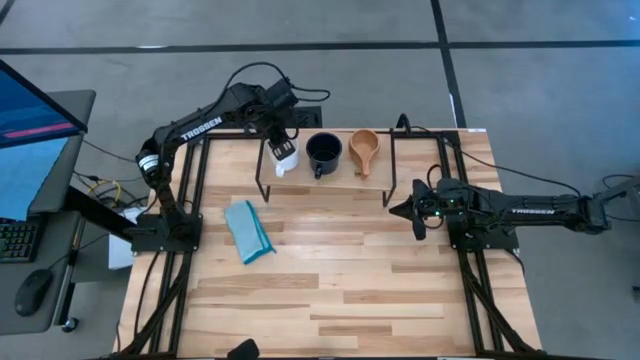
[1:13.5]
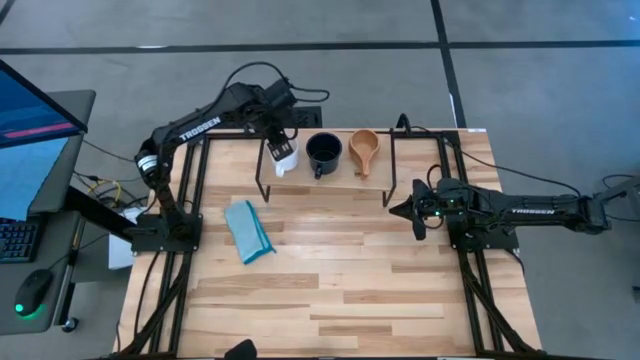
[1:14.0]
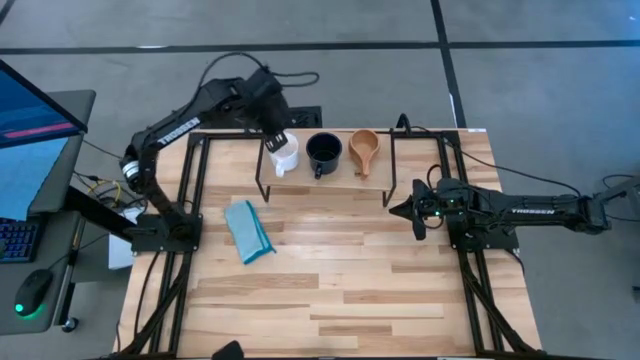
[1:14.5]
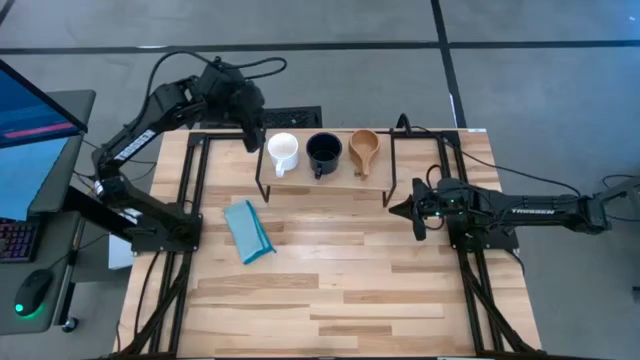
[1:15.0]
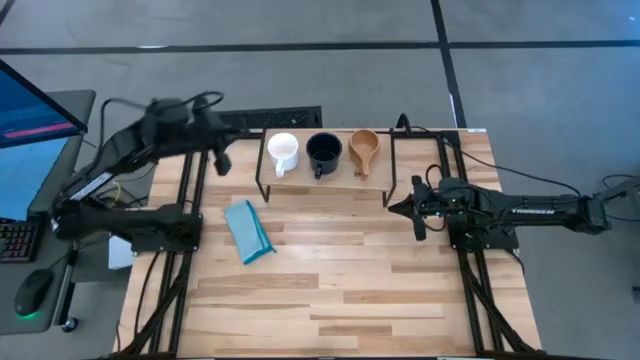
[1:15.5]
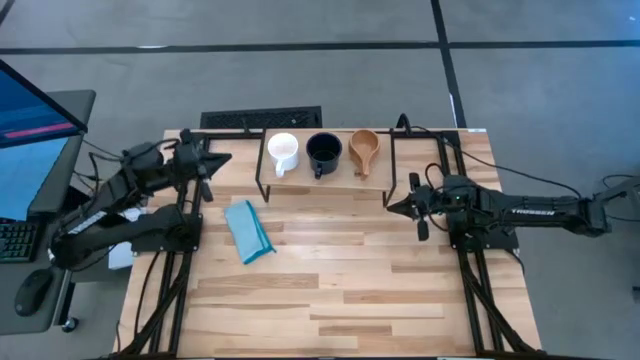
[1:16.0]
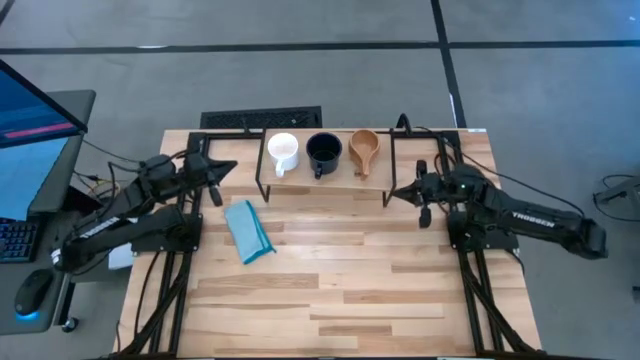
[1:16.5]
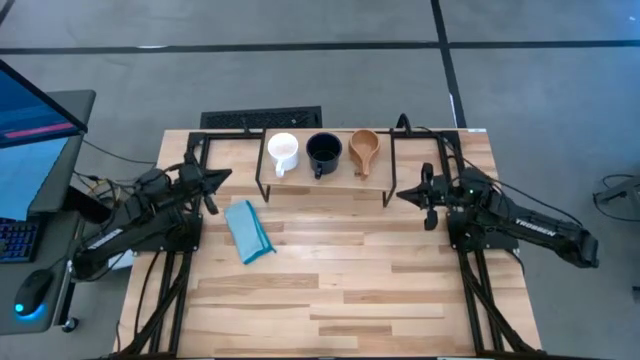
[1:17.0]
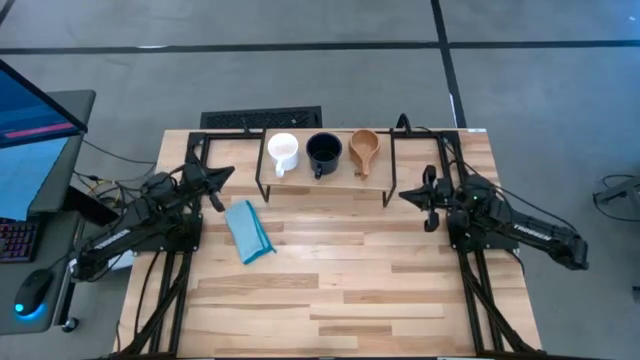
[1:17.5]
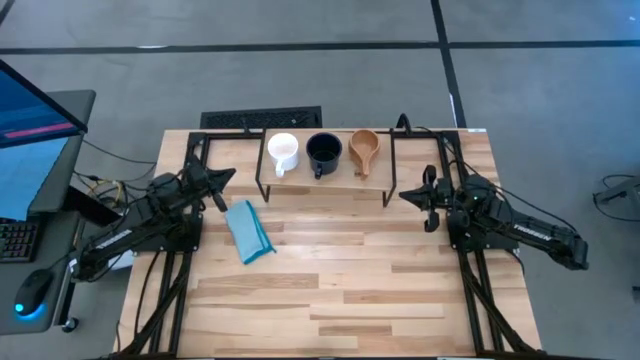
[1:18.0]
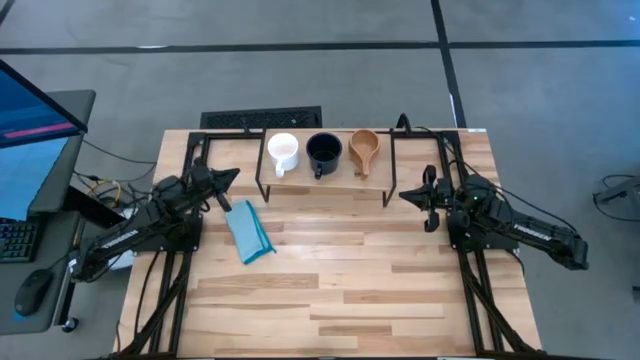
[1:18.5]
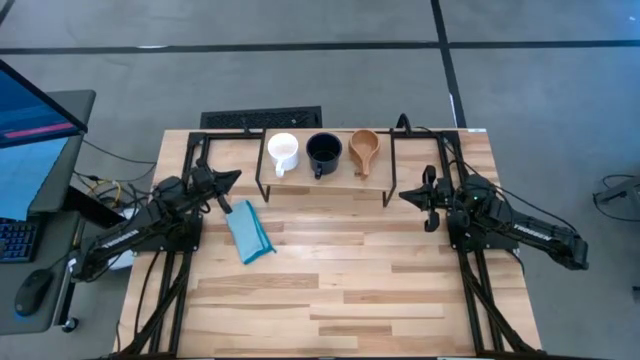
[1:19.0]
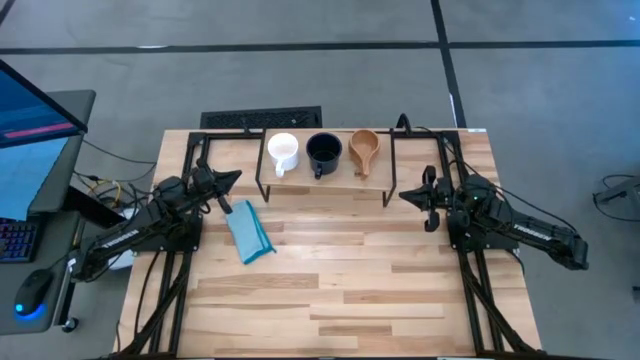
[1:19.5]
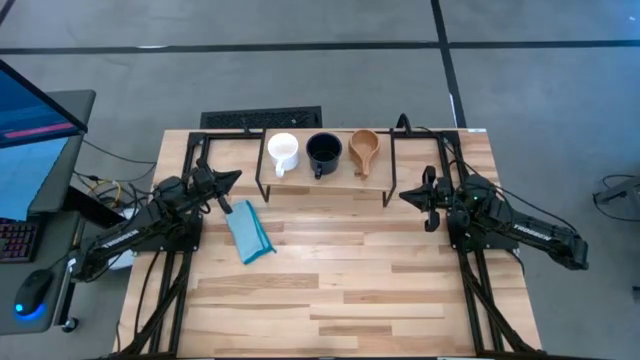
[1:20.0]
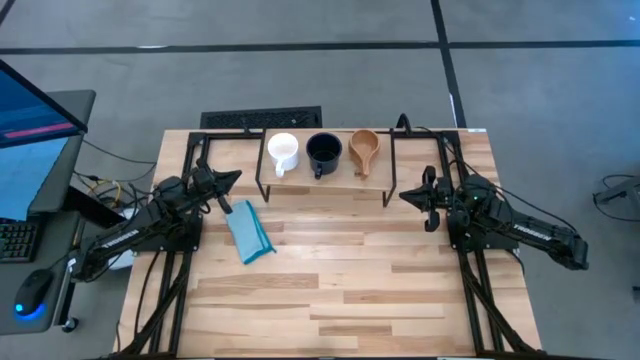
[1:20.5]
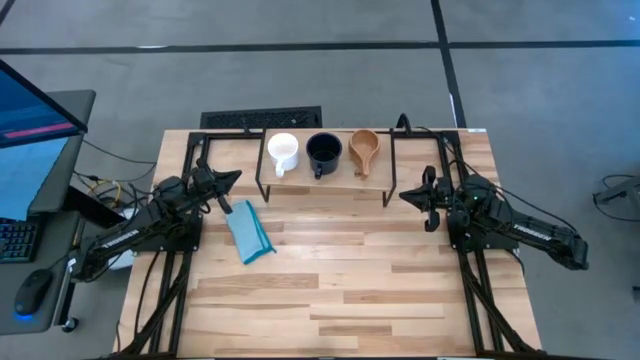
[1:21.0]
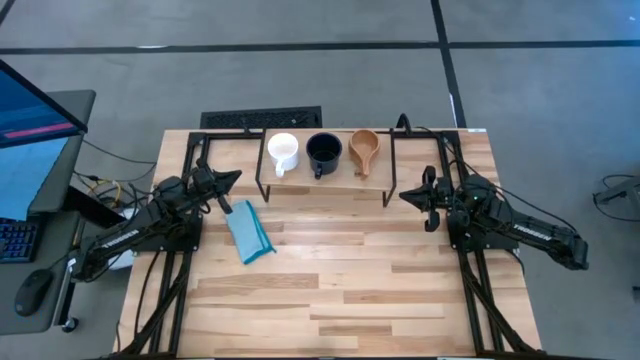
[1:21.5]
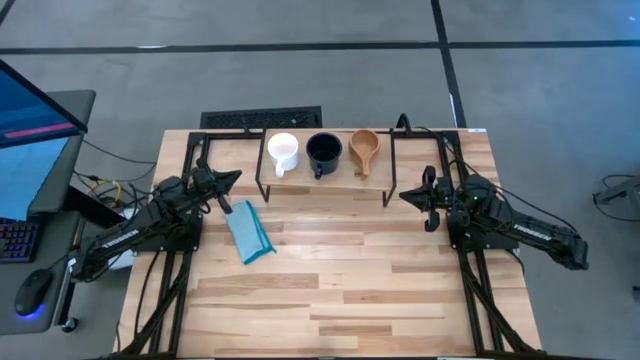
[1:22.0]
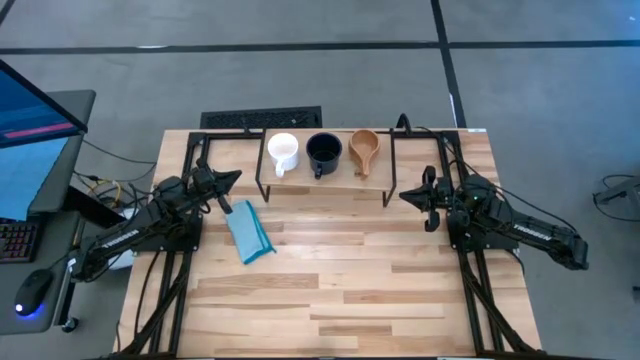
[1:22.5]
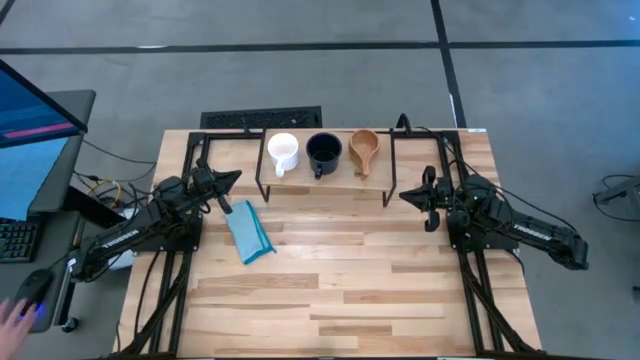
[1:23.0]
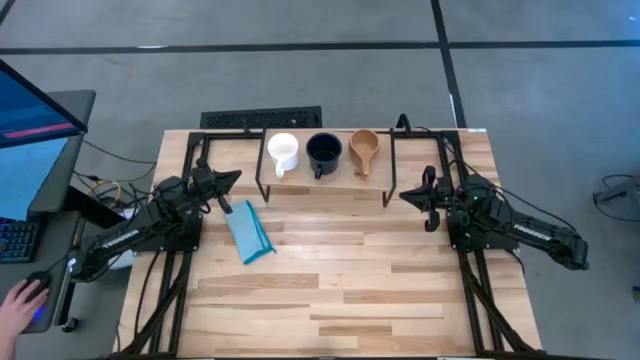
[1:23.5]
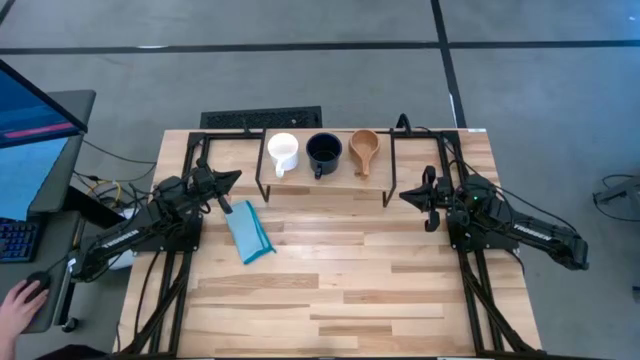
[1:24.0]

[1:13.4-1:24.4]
Task: Stack small to large cups/mugs on shelf
Return to Home Position

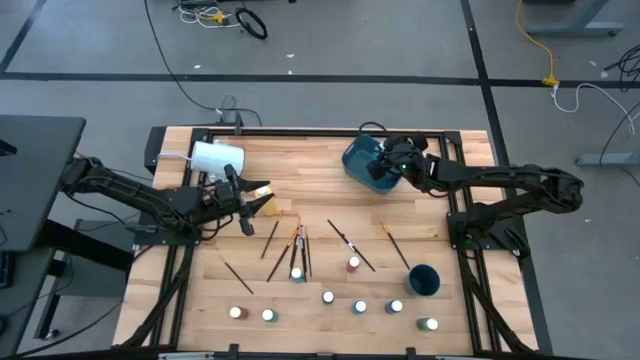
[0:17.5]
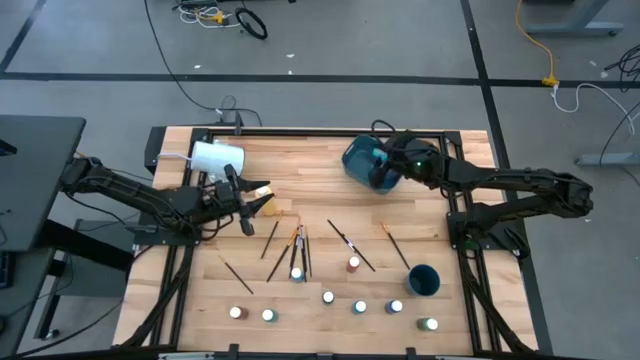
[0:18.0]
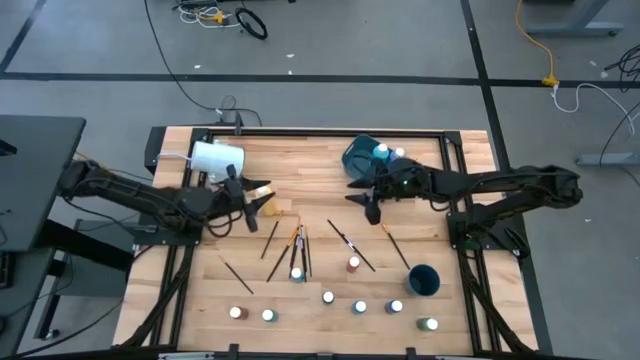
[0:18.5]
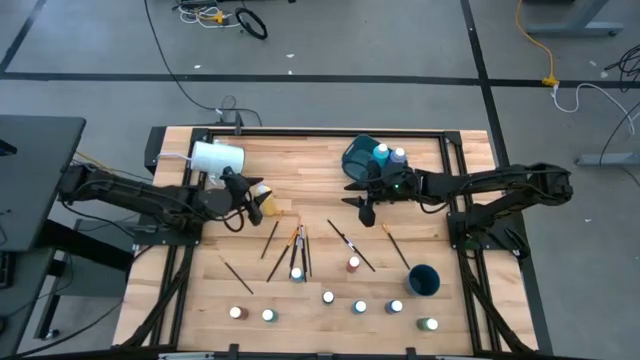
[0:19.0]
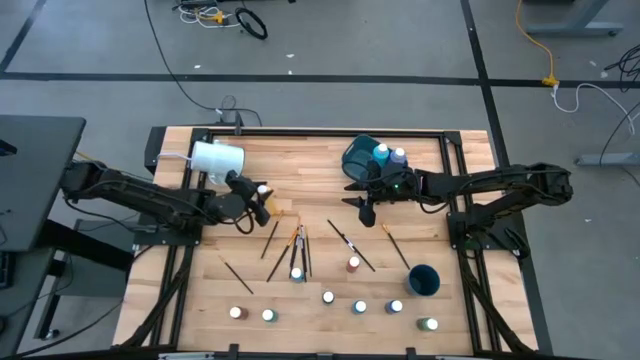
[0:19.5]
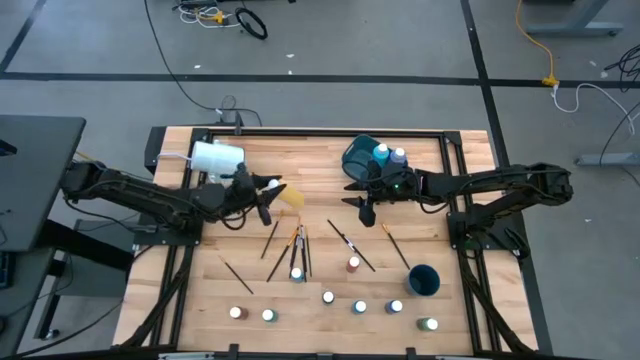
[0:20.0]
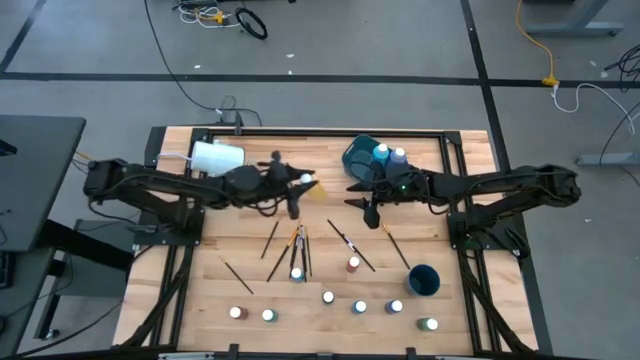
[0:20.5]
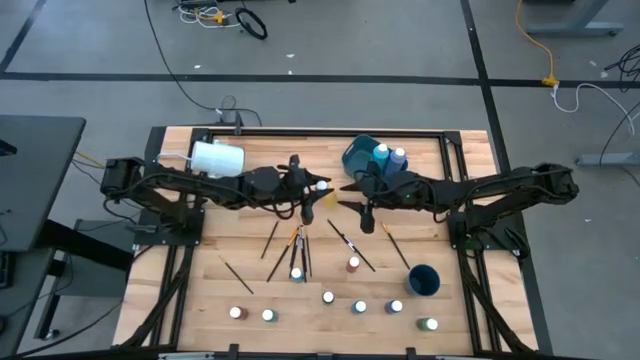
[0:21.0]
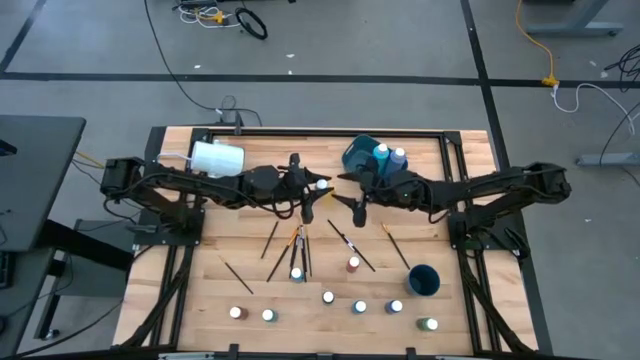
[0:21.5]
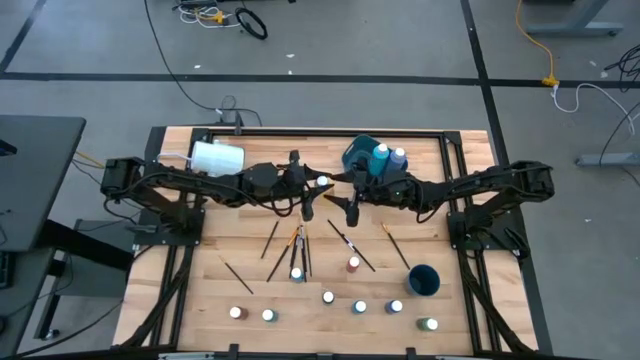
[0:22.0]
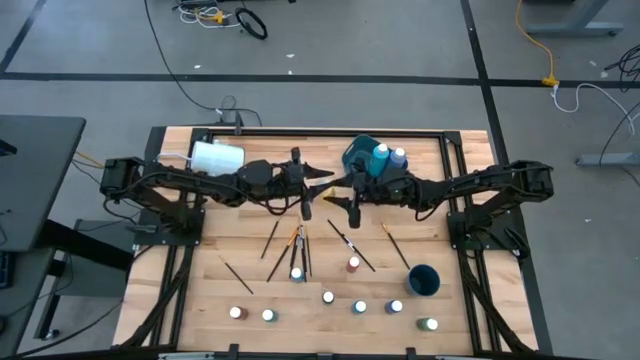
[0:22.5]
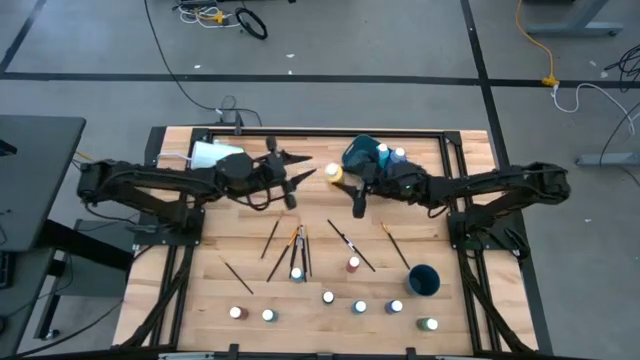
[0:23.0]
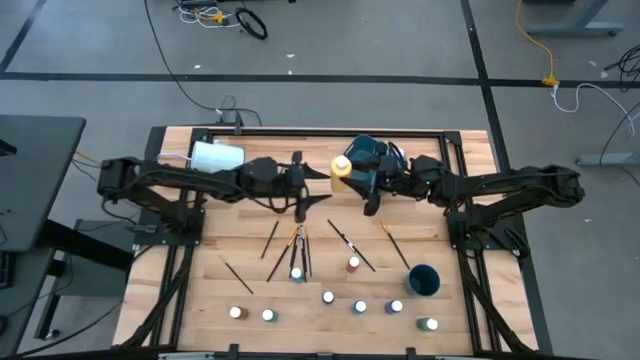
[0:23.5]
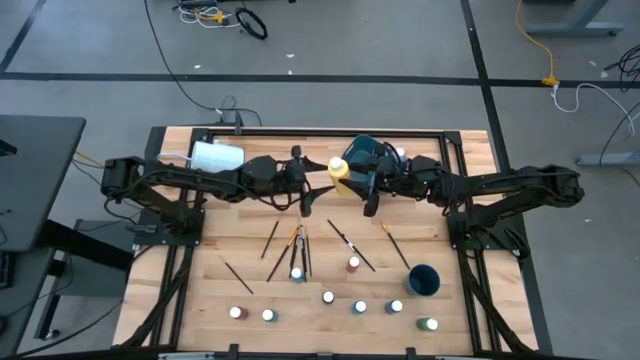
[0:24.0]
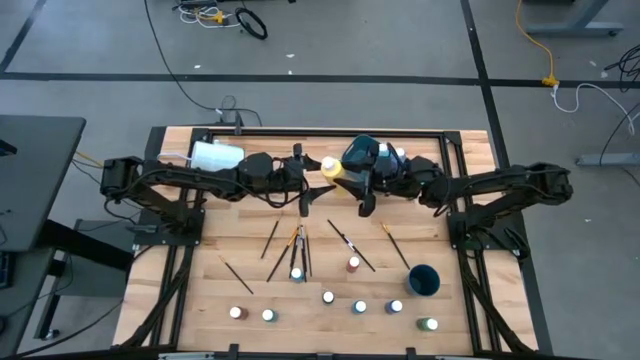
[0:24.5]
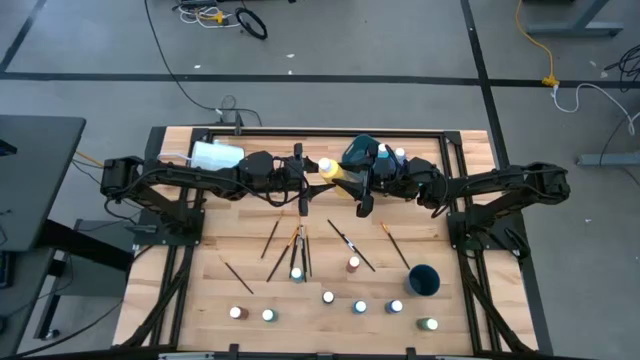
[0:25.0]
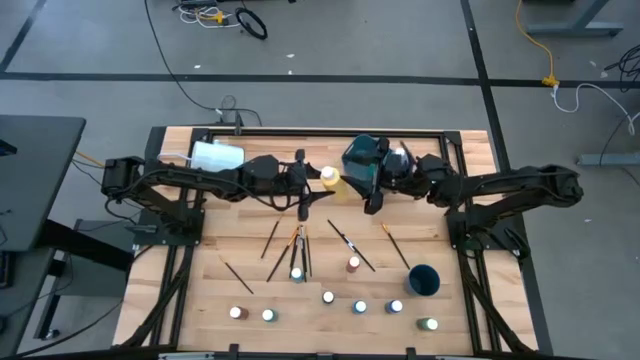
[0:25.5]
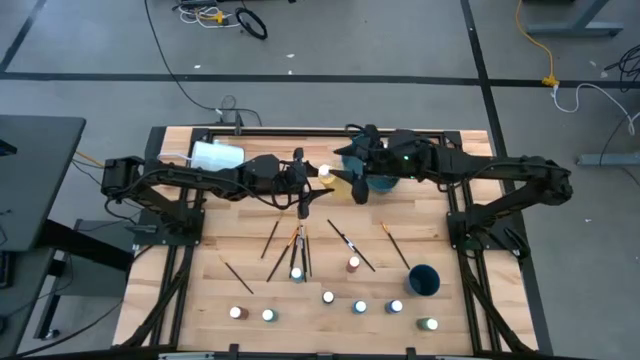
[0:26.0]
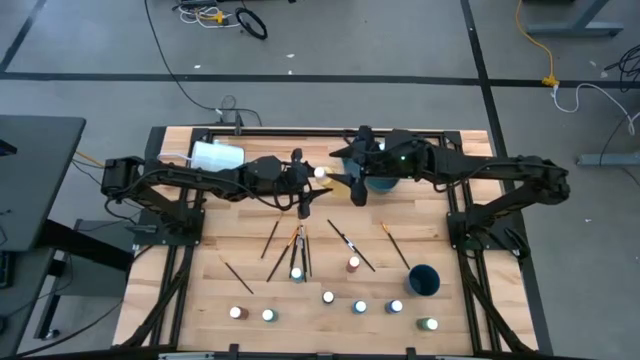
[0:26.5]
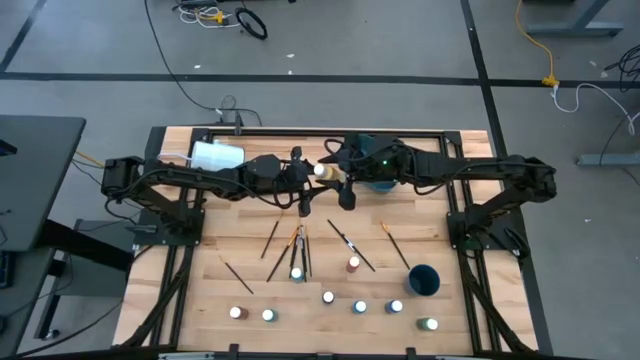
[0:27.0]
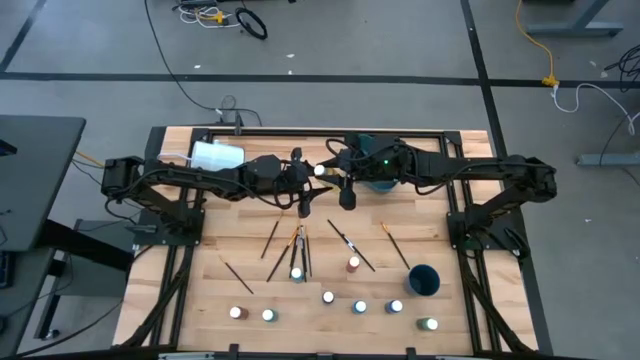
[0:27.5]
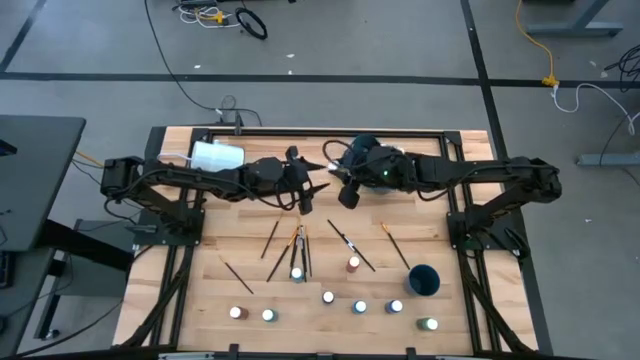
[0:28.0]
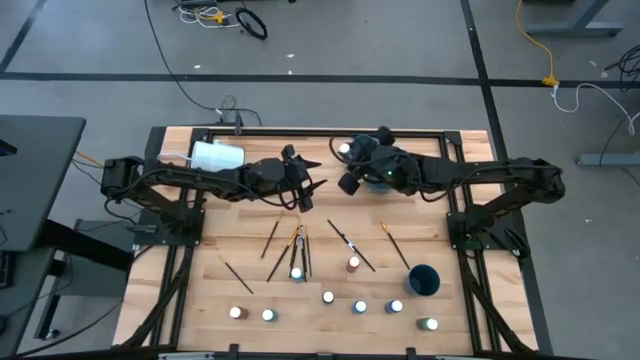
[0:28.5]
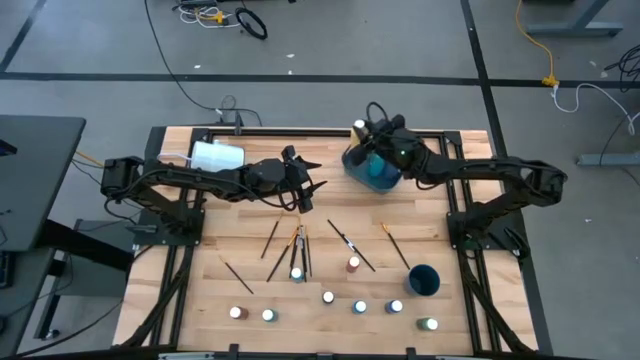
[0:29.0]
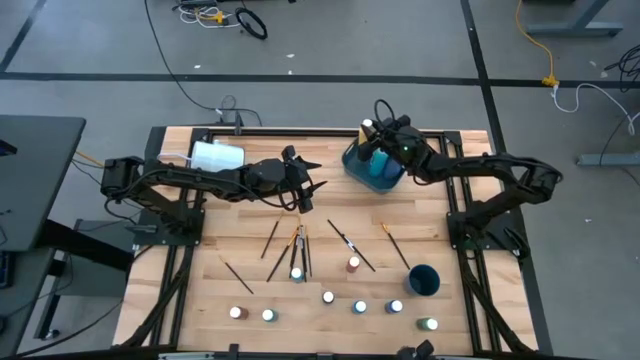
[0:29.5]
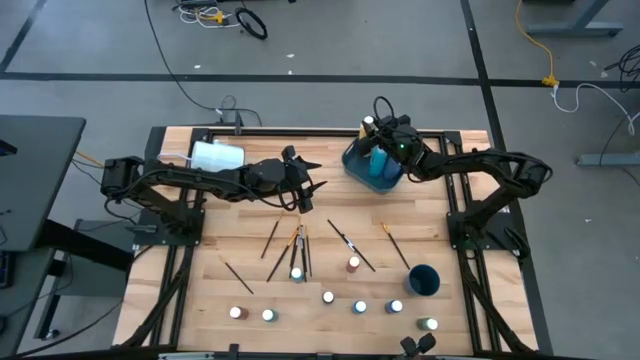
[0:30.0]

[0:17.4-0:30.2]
Task: Pick & Place Paint Supplies
Put the large yellow paint bottle into the bin
